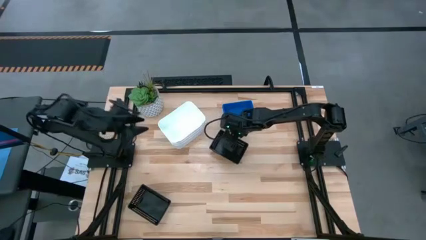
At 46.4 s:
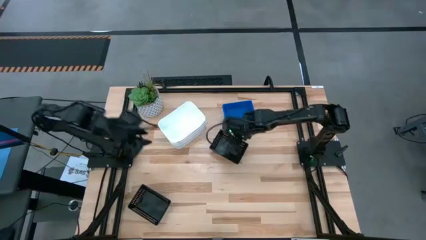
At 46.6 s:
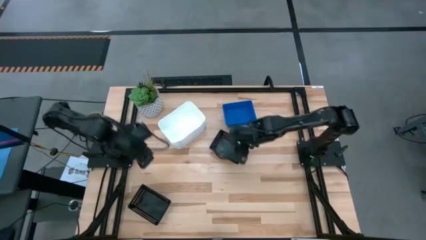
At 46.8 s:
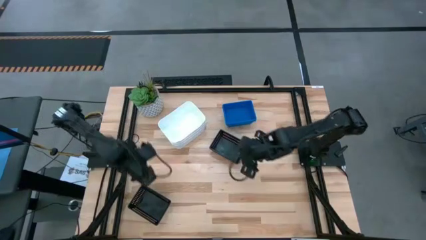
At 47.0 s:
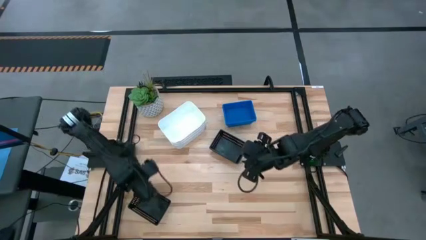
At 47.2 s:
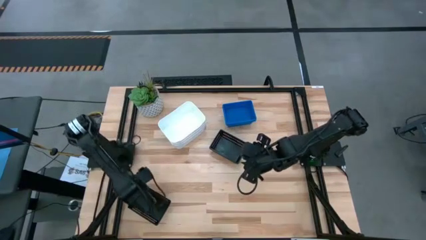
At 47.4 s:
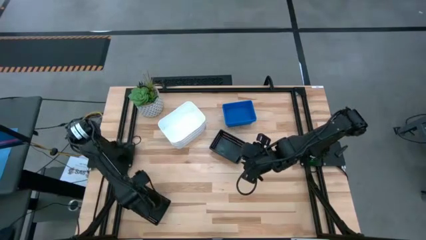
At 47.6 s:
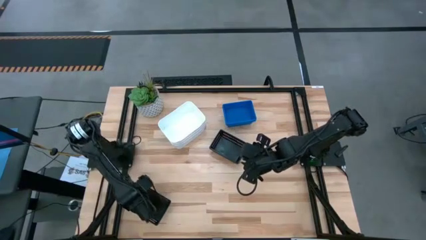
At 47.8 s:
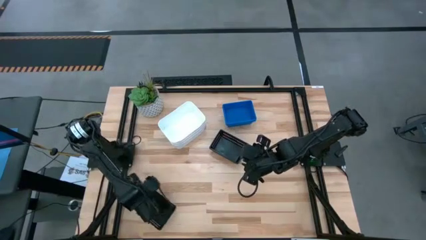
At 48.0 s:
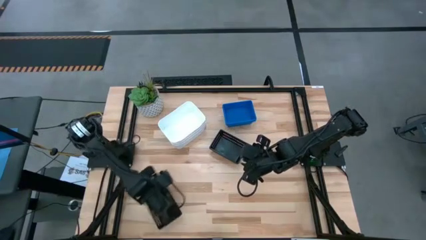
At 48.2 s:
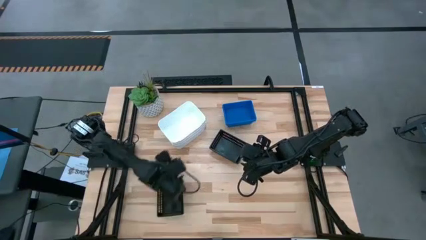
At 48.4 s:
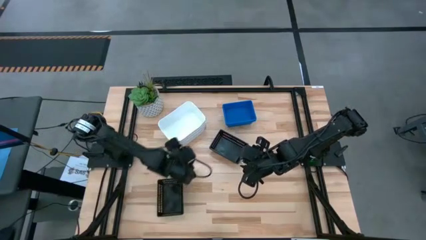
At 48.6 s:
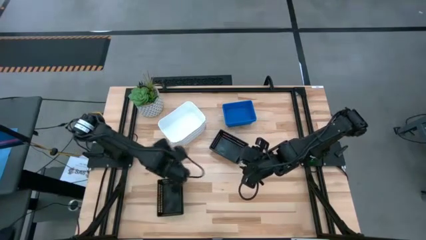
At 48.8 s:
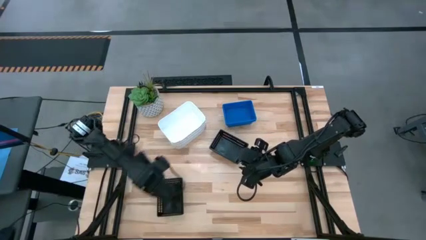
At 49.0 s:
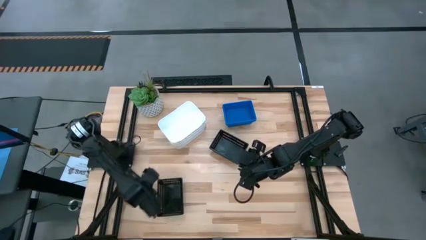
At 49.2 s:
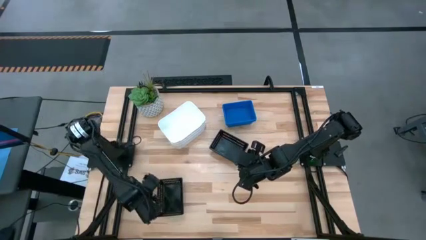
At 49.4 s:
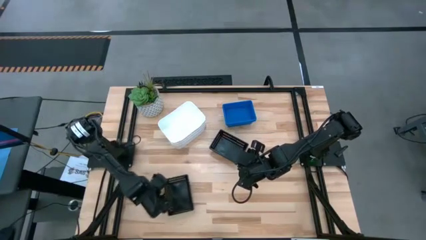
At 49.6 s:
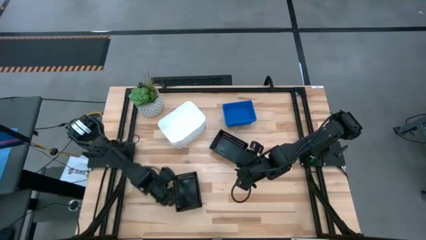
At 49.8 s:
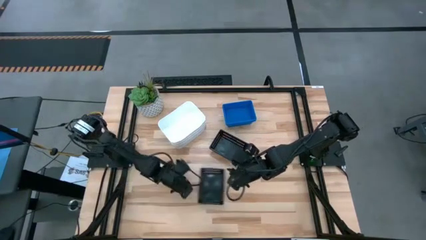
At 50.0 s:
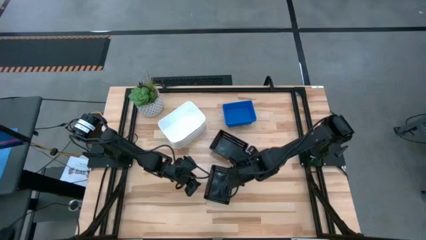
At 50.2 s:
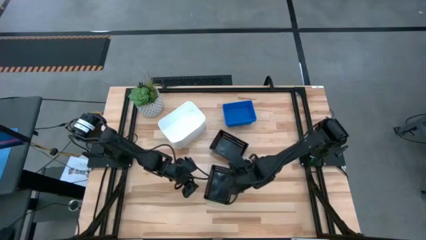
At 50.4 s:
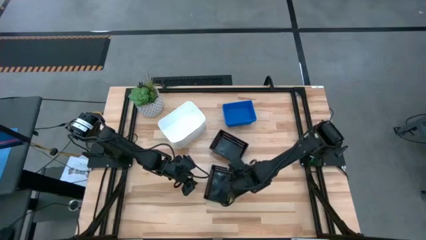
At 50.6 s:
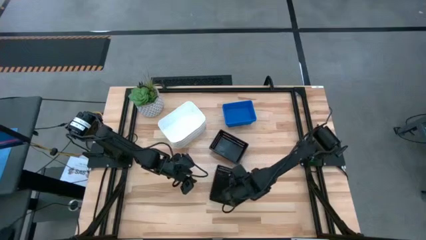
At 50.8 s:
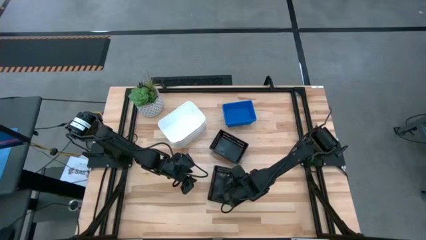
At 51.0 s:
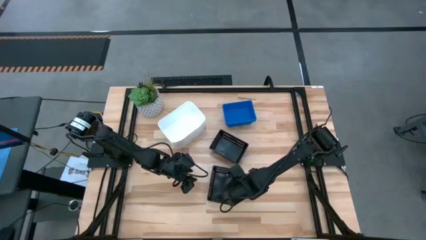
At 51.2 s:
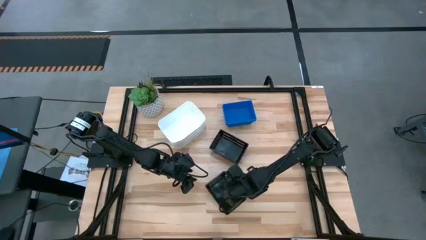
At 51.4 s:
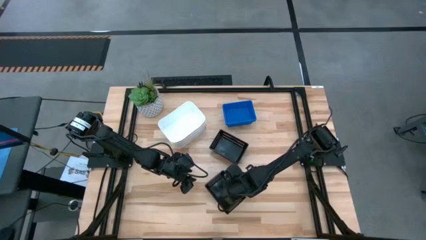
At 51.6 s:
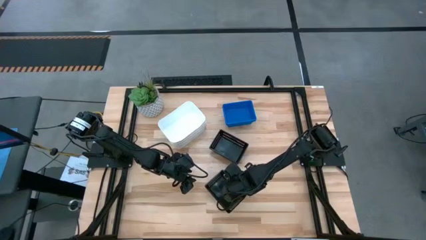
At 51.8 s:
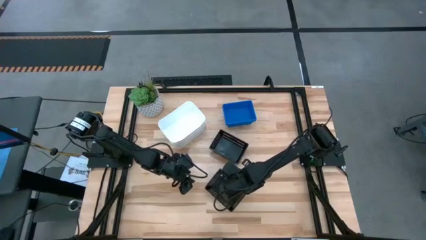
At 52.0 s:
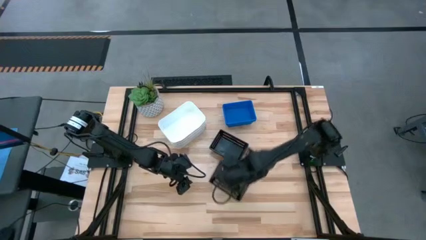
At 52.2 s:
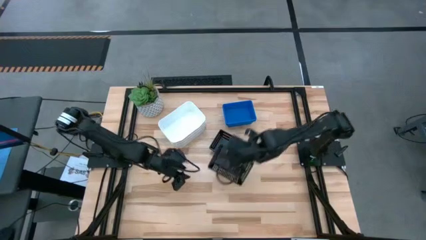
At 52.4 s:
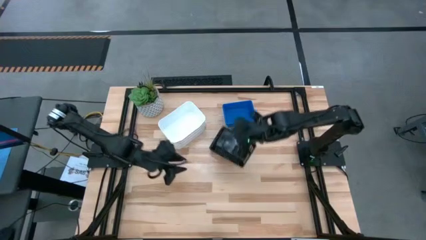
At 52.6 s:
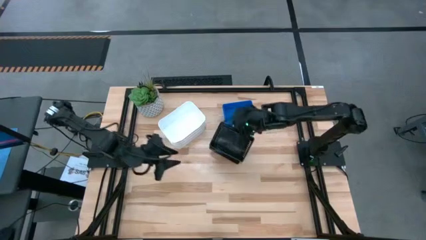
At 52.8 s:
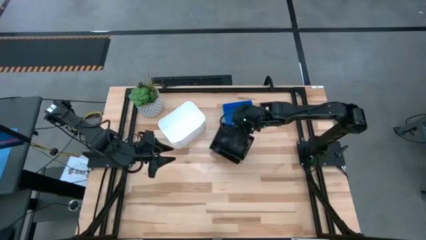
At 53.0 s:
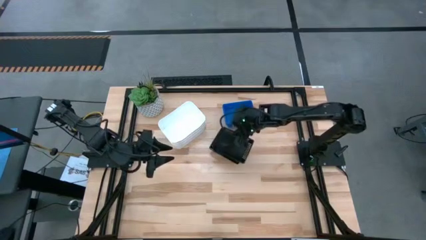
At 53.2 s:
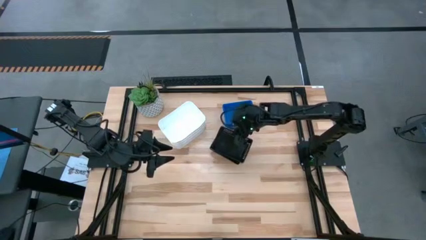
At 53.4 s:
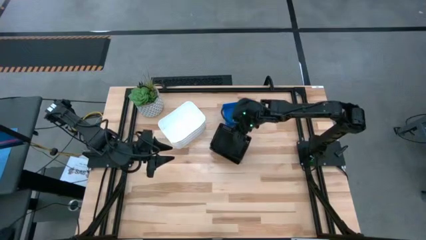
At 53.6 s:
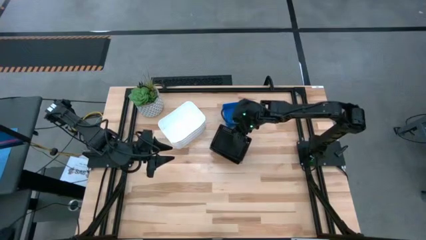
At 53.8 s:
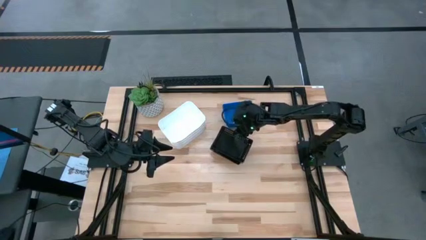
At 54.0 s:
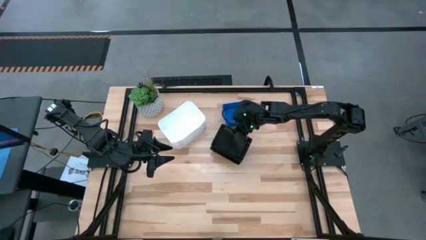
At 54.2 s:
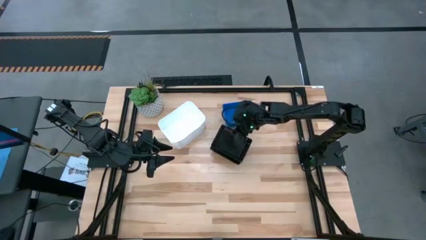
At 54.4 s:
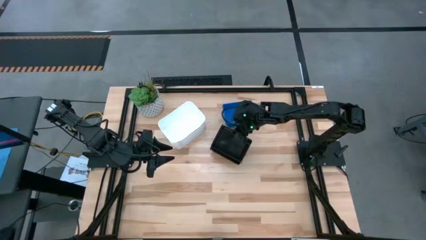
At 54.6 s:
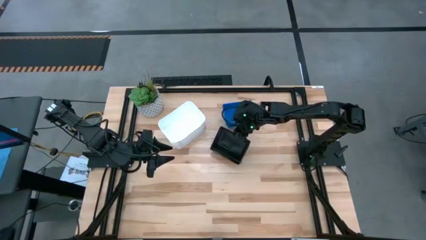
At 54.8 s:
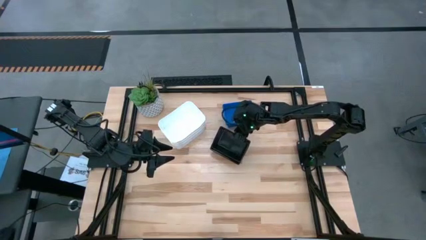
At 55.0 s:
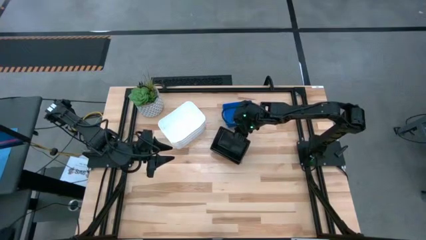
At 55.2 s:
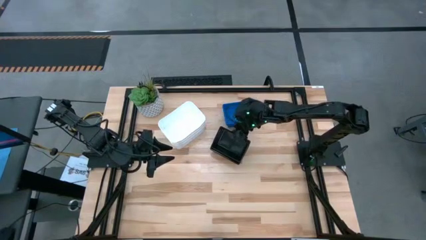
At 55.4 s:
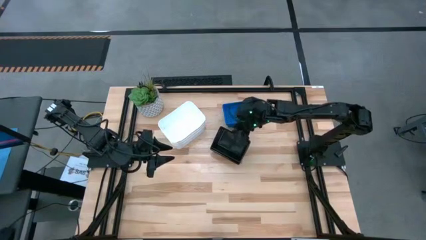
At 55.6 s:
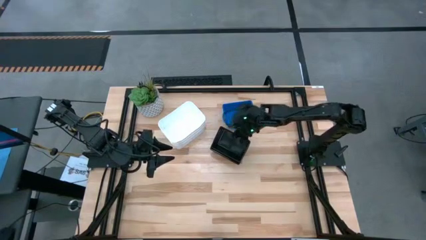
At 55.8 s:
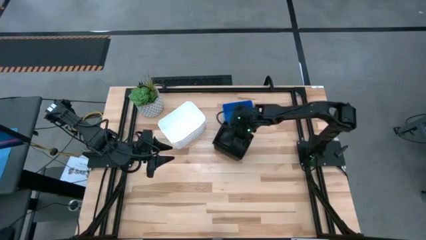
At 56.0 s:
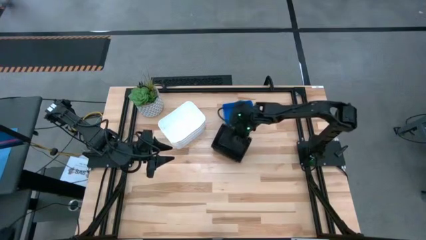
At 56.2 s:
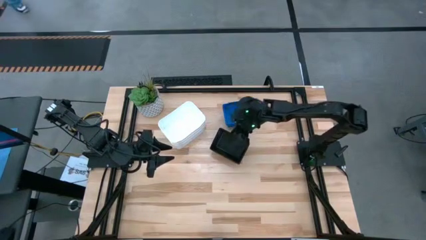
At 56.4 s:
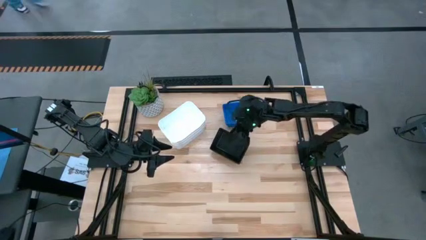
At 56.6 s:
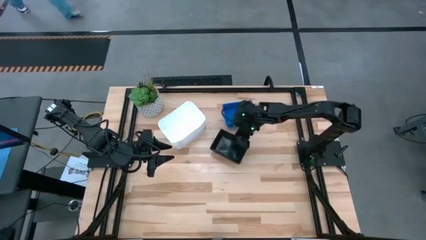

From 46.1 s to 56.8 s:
Stack the bottom black bin on the black bins

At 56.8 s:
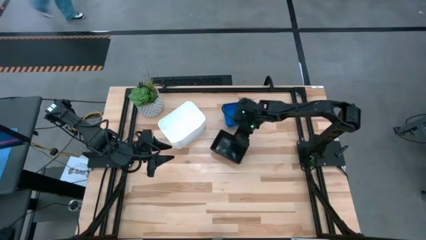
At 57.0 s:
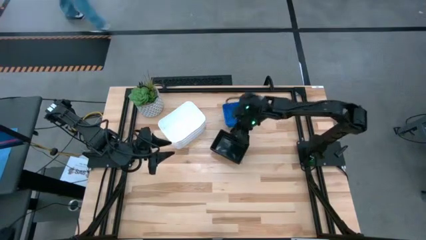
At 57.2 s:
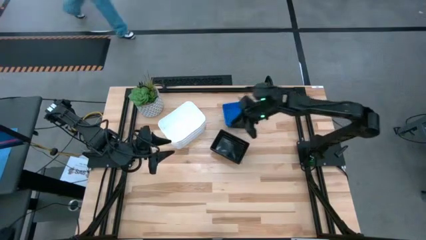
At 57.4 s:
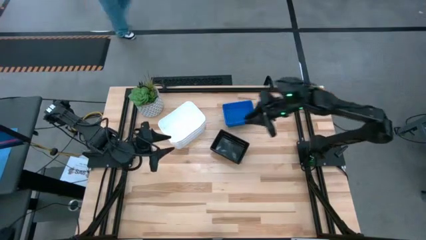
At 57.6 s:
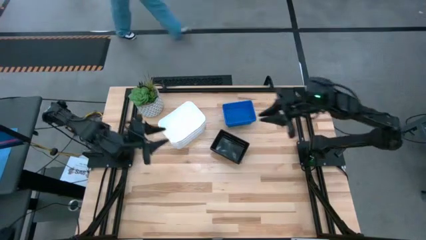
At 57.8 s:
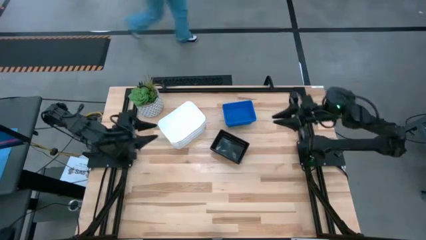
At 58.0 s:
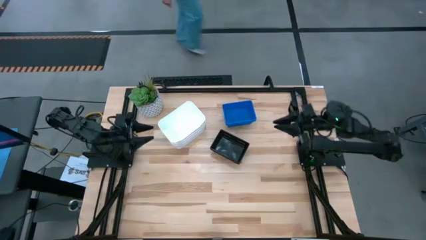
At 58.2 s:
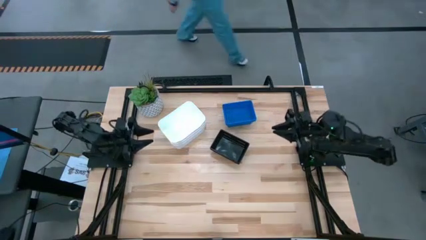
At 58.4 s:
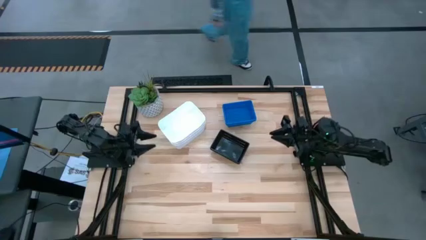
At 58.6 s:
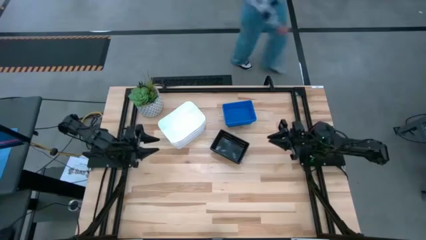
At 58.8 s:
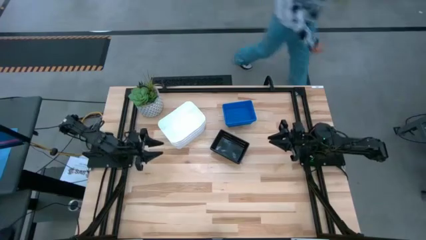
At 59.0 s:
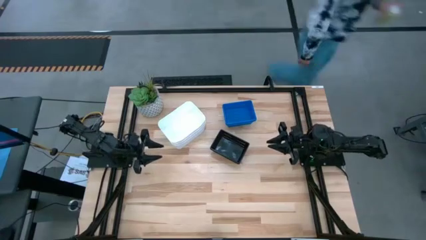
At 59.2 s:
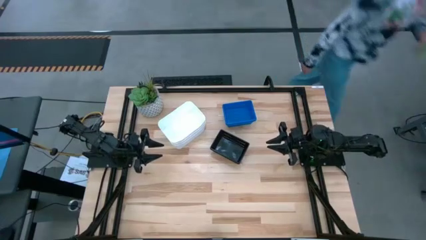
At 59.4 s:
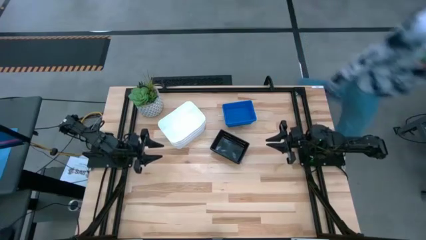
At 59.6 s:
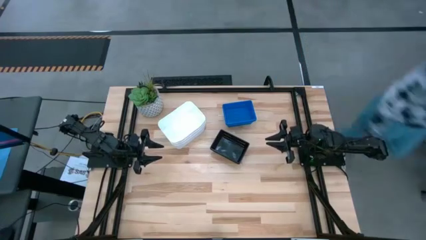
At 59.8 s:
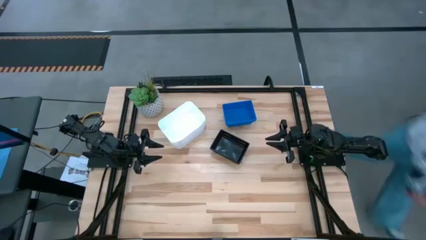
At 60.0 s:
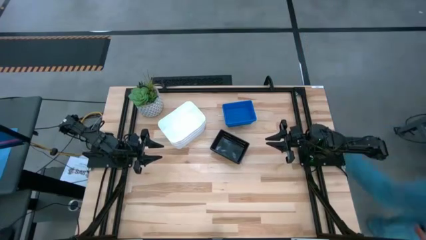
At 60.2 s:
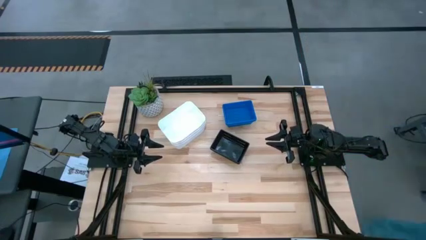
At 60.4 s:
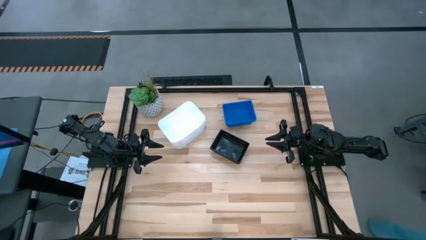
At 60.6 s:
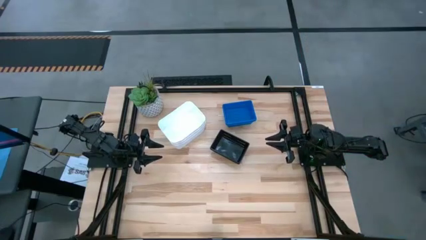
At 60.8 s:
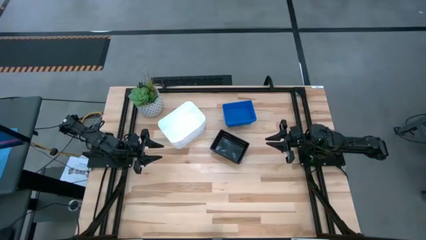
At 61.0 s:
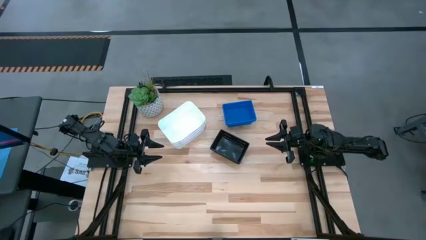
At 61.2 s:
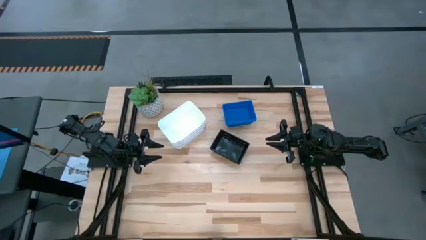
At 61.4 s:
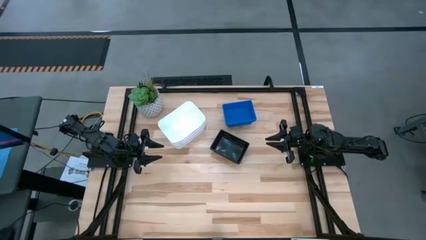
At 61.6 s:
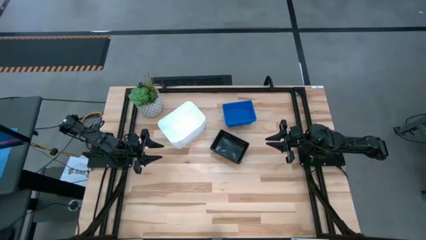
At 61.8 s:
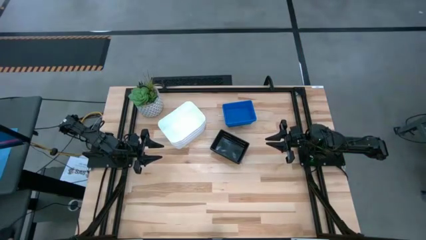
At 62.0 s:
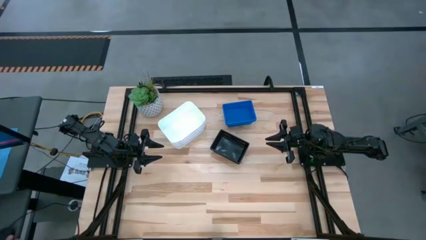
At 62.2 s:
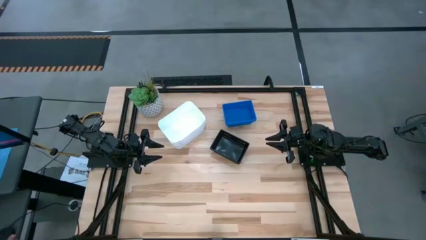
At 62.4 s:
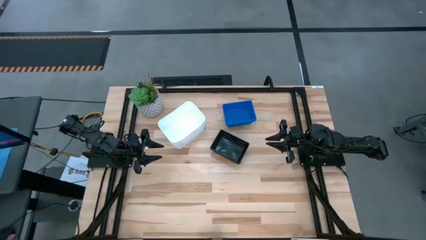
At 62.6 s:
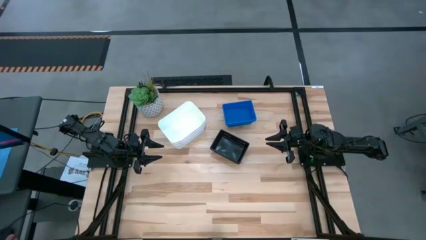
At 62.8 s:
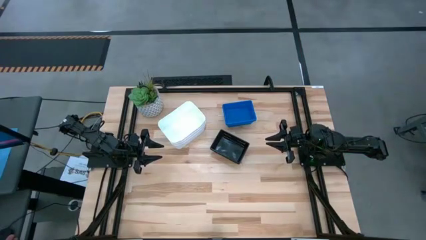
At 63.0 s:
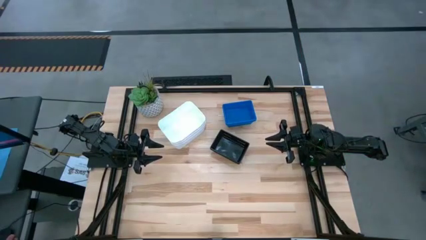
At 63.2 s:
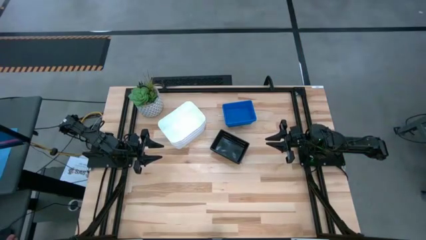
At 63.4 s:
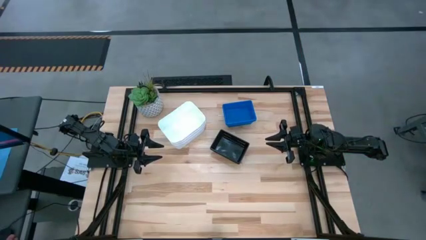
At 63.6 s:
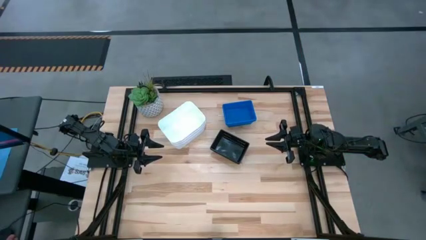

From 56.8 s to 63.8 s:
Return to Home Position
